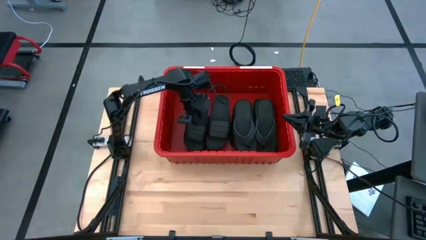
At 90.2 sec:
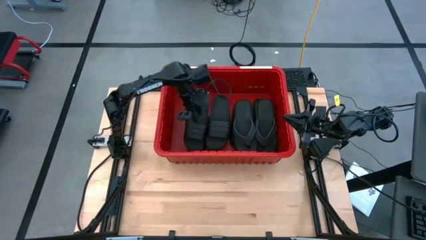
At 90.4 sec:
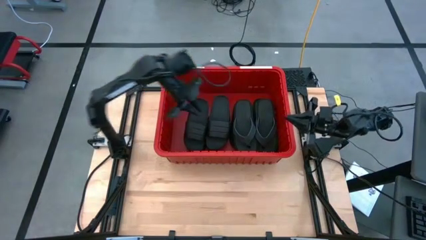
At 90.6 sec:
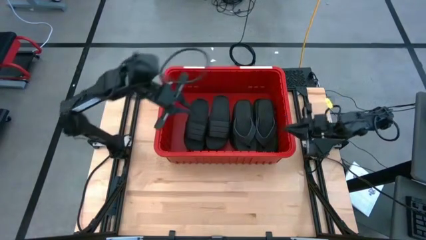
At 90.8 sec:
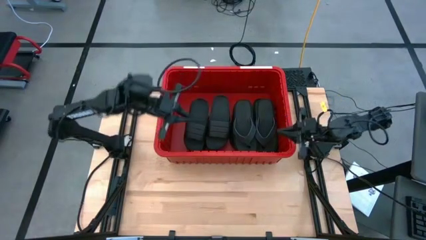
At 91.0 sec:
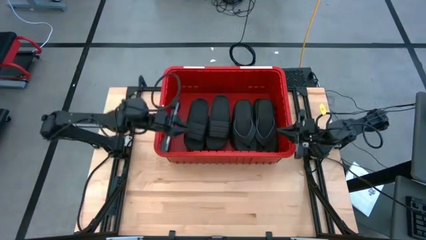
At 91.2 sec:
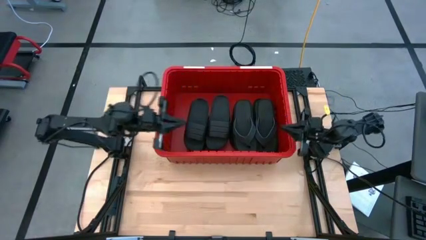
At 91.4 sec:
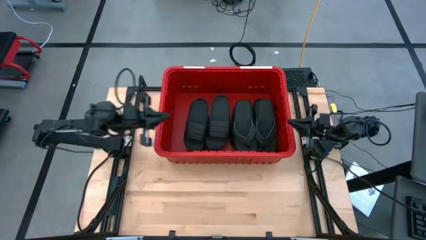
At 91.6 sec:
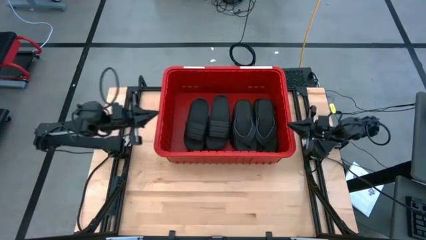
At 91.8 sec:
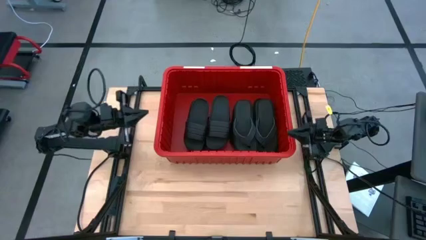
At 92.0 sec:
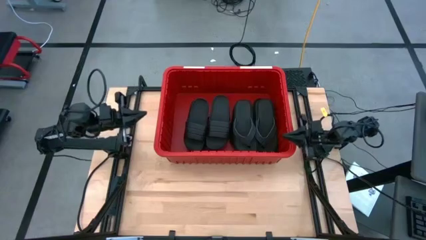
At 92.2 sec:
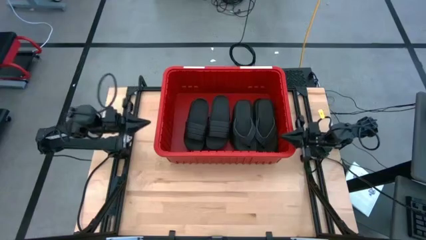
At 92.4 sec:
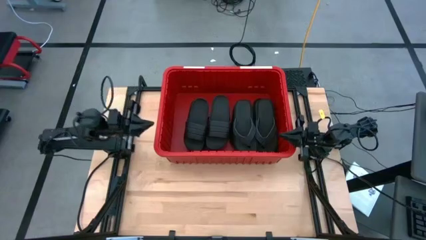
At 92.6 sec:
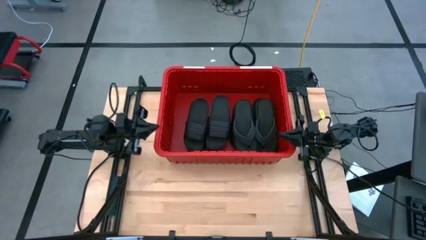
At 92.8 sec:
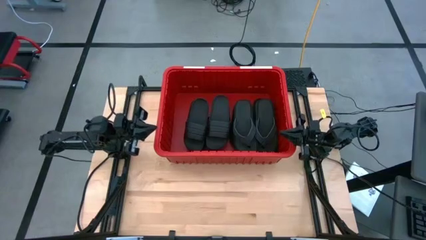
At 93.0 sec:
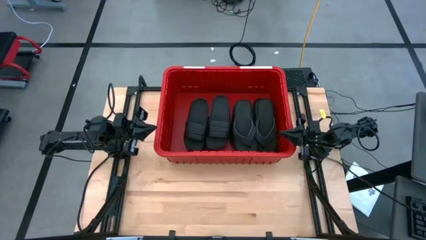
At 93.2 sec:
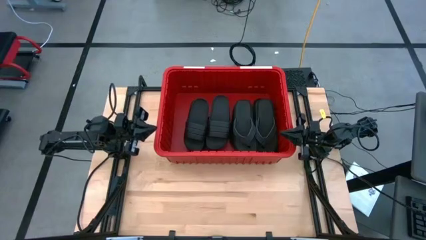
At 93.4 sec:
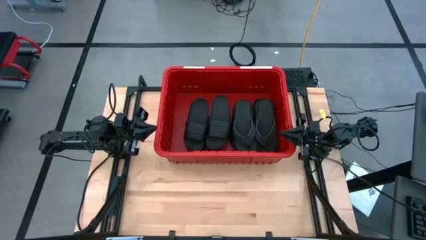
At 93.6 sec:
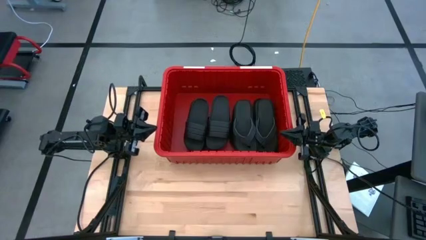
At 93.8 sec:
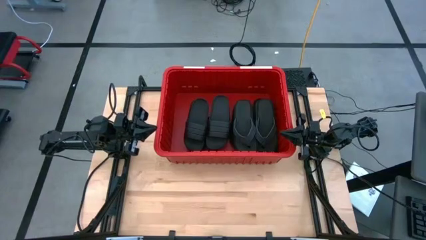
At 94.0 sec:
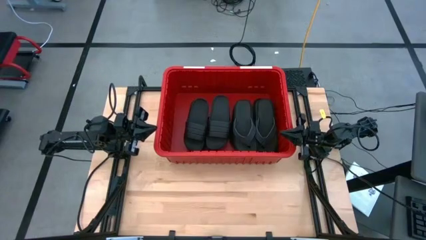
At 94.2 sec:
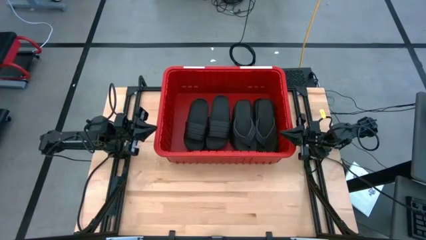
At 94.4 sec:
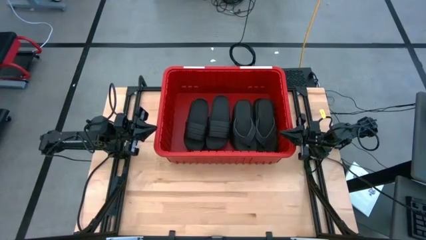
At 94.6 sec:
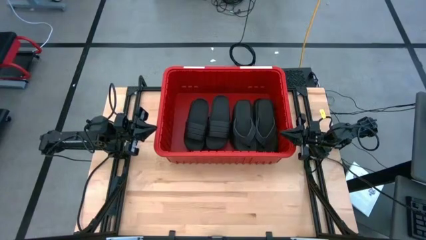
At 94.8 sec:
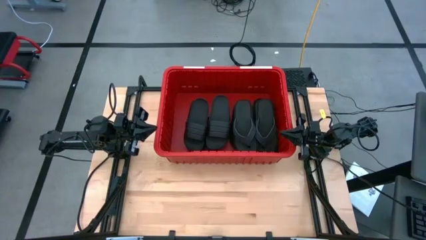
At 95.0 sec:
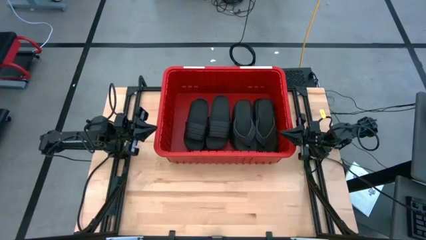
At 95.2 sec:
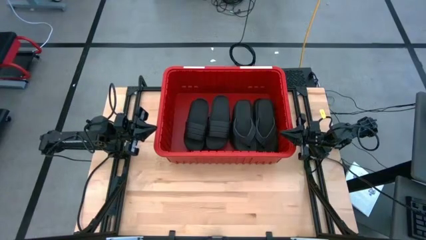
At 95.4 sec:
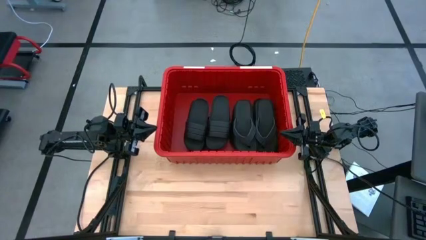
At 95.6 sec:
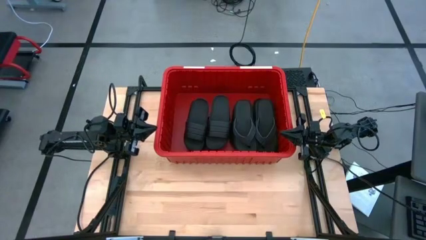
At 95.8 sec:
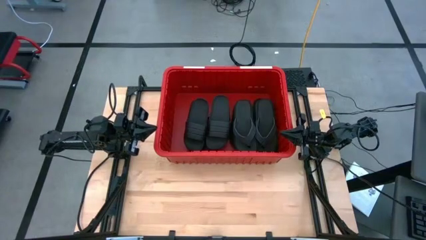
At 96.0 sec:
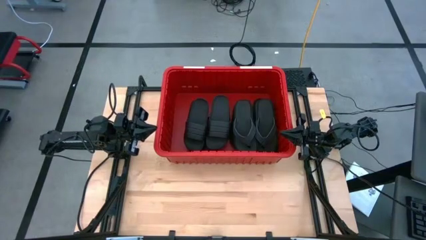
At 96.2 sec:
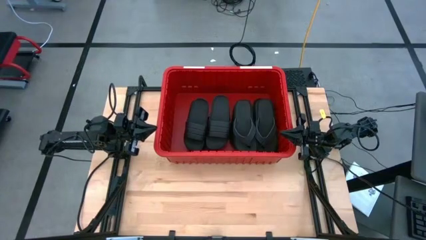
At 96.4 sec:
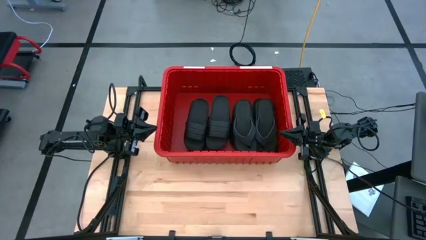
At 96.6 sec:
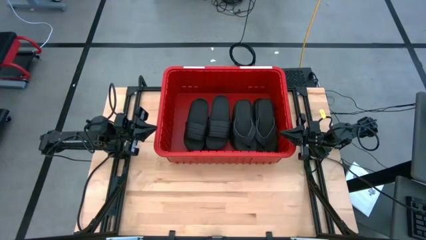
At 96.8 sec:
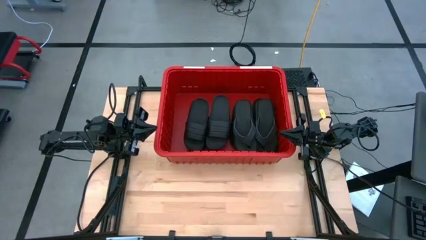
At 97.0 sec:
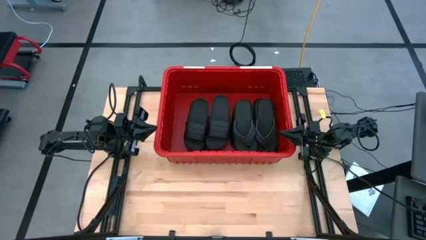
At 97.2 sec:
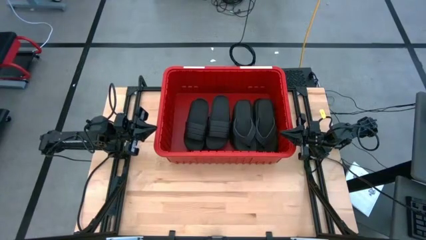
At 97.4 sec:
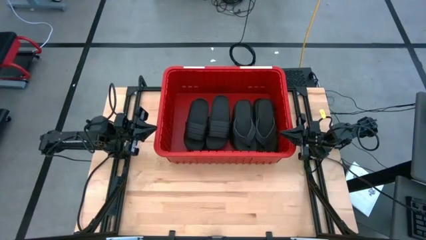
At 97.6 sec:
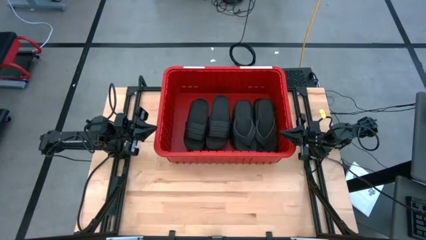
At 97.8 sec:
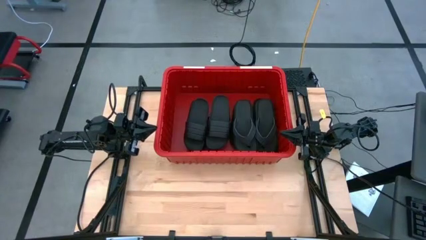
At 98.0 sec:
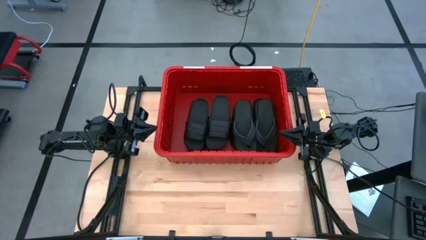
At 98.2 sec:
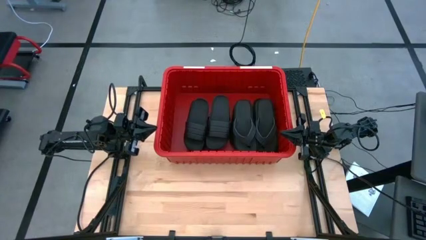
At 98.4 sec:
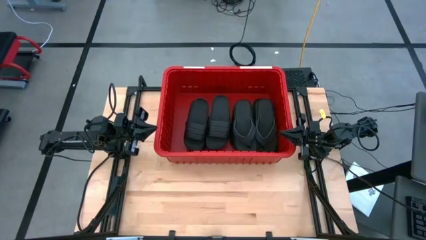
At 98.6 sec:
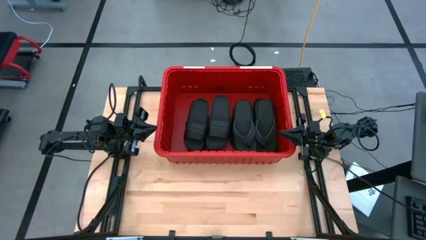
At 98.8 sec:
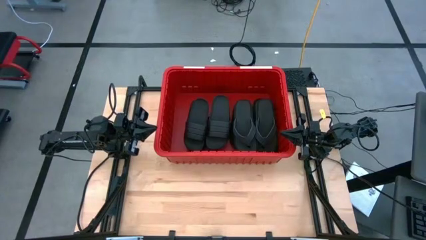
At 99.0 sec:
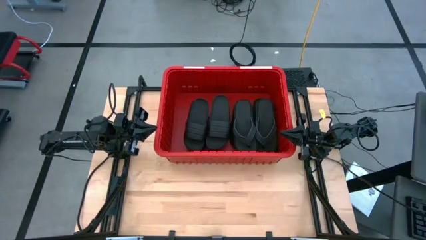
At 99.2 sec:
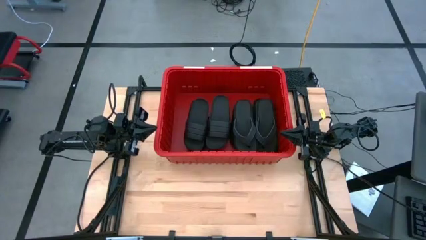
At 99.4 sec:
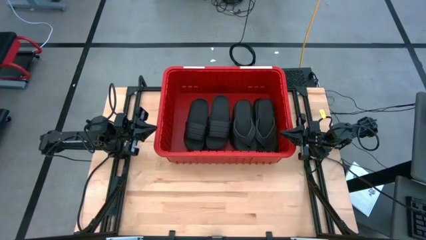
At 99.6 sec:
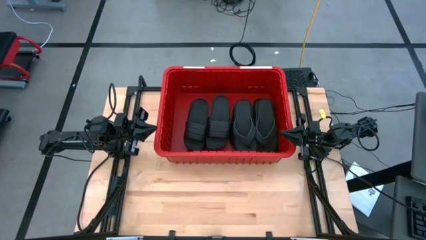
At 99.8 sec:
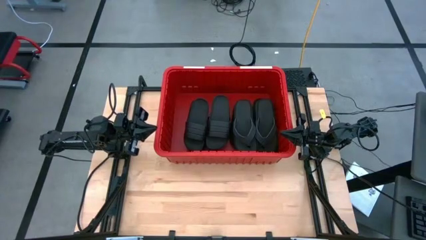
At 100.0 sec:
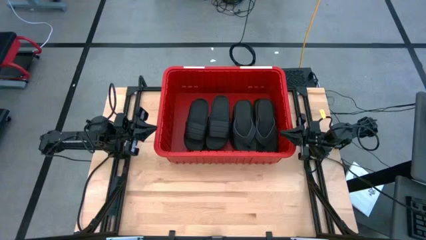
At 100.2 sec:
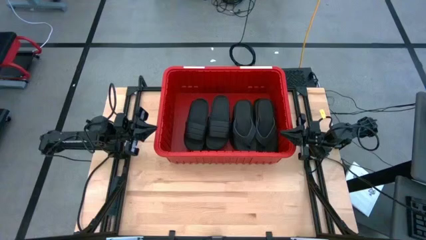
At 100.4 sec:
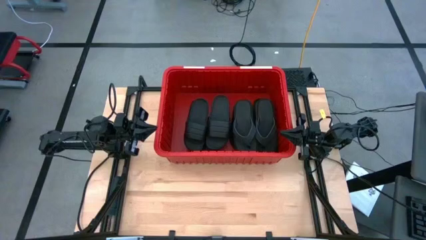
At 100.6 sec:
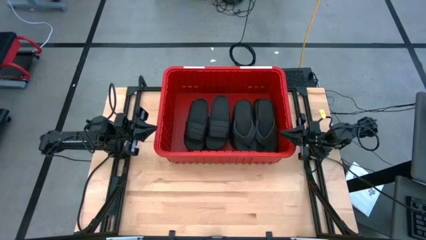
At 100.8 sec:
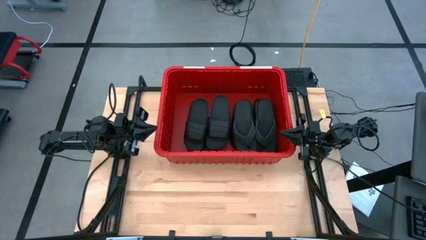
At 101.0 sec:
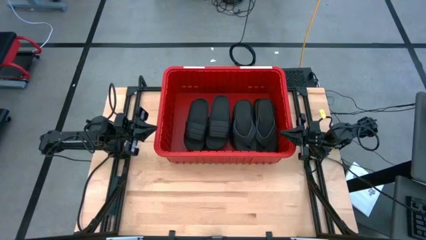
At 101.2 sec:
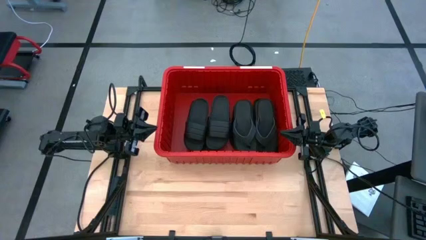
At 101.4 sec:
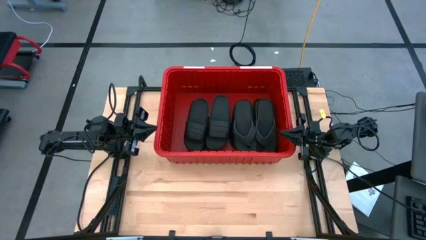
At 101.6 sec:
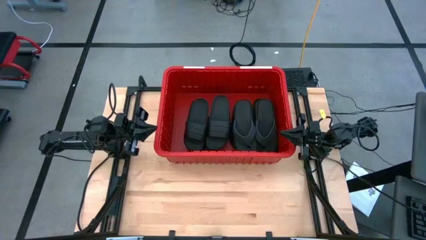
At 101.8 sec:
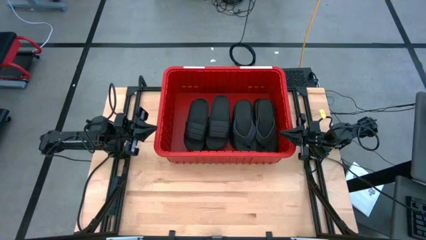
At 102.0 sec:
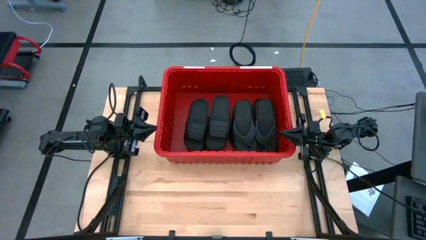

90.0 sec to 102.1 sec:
Task: Pick and place slides into bin
Return to Home Position

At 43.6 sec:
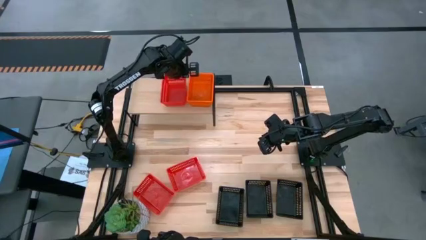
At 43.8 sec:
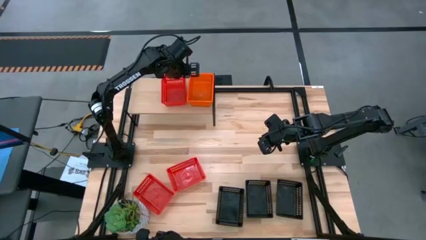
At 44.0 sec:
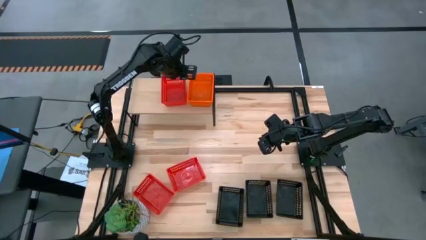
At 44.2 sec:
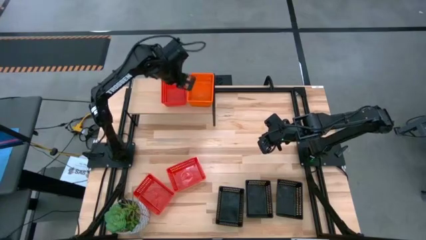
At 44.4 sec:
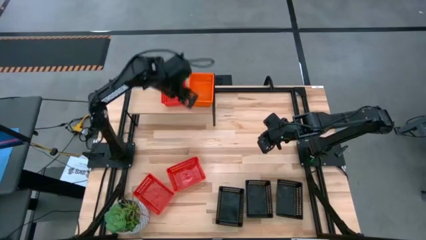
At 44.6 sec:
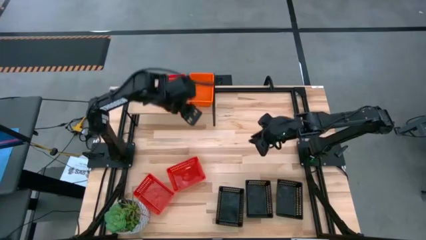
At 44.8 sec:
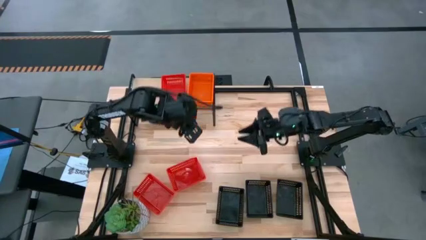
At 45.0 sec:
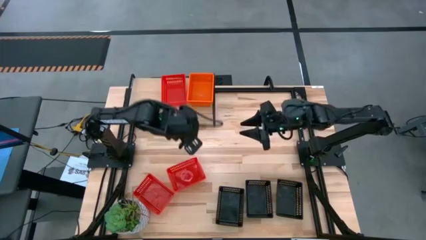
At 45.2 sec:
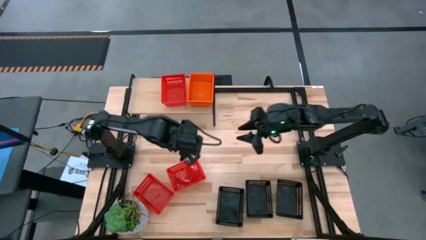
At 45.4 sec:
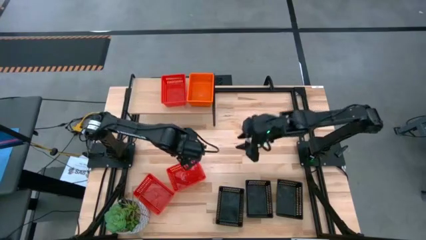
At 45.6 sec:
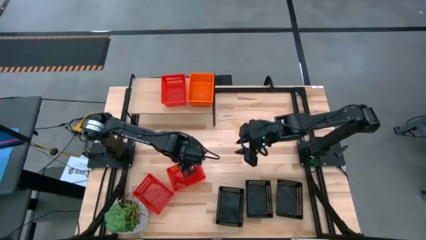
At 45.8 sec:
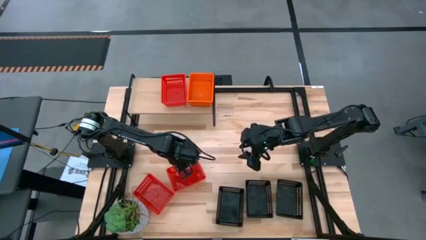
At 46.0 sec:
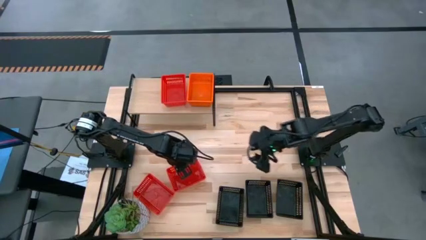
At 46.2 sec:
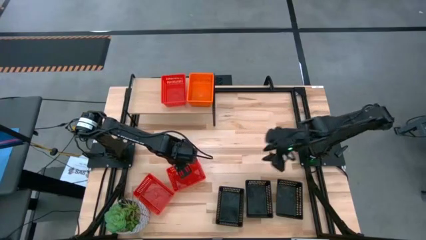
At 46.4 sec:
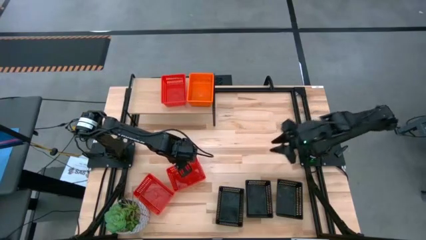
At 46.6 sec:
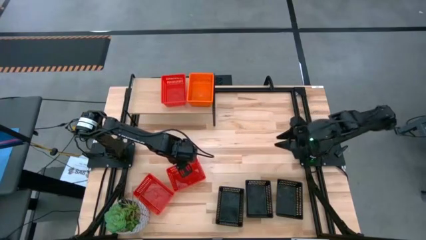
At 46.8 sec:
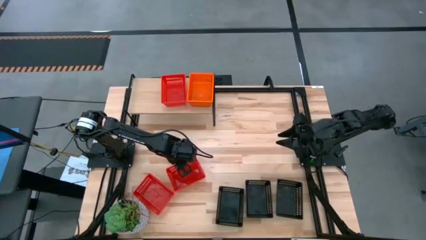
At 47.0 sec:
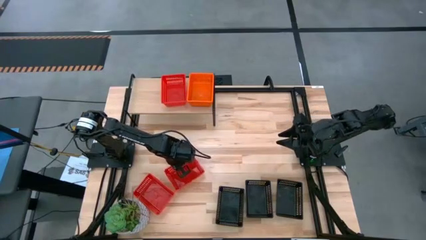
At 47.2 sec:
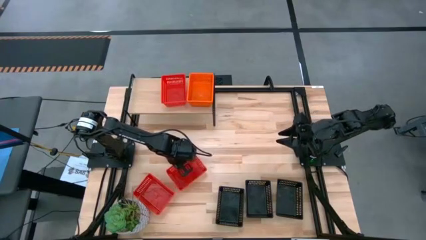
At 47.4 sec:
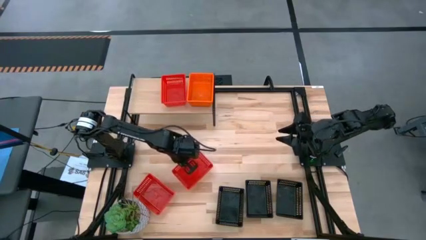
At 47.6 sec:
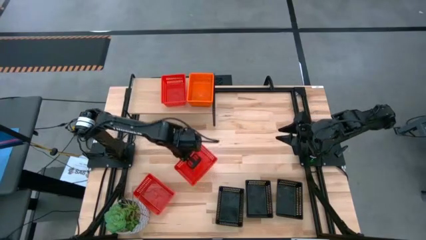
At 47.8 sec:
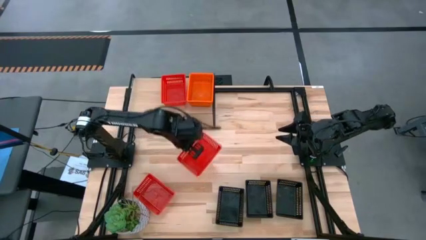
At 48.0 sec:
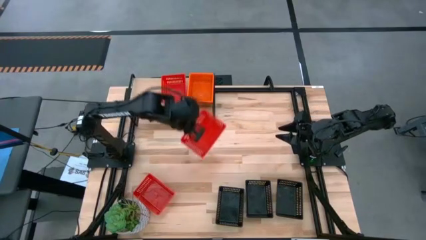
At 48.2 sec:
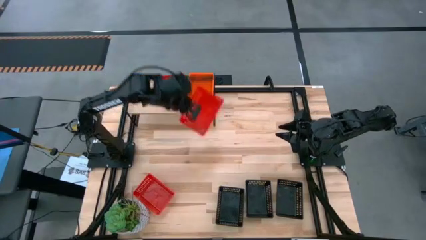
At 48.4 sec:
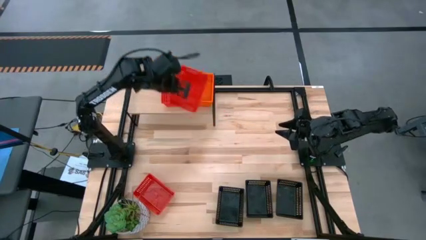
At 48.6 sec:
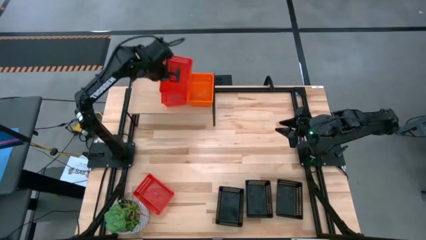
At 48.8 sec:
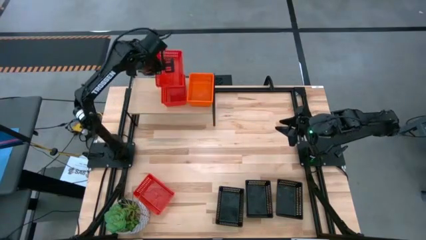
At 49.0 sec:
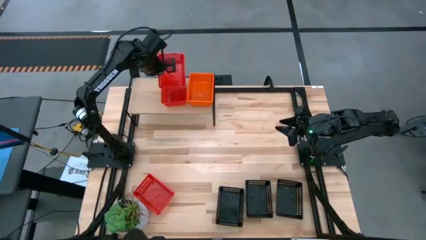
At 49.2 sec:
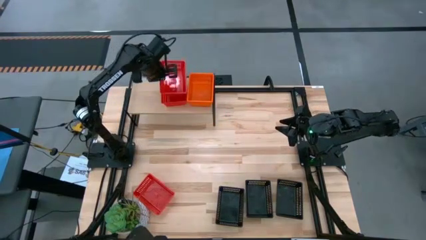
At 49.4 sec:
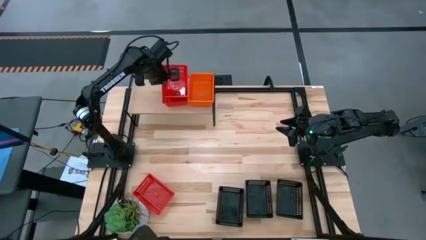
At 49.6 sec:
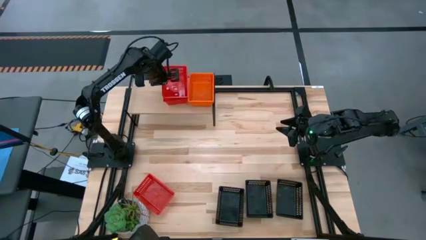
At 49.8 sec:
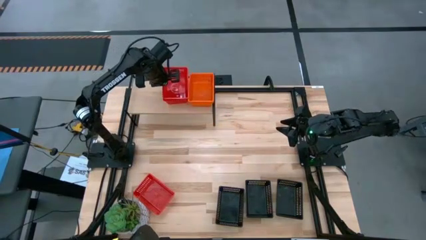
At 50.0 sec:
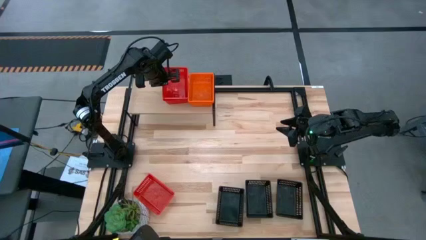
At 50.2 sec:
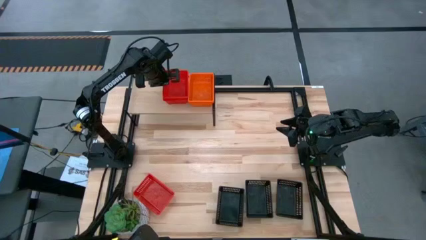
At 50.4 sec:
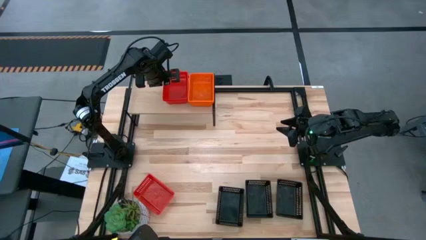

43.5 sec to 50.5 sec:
Task: Stack baskets on shelf by color
Stack the right red bin on top of the other red bin on the shelf
